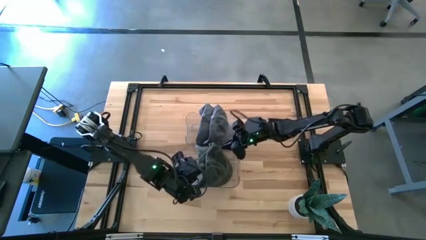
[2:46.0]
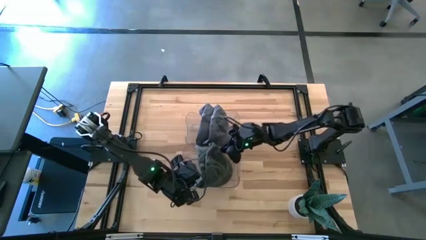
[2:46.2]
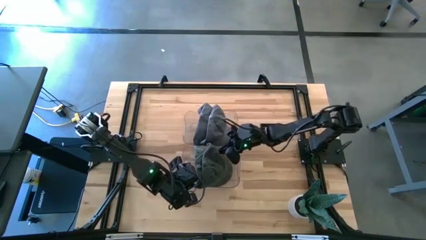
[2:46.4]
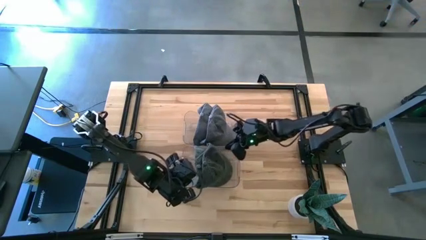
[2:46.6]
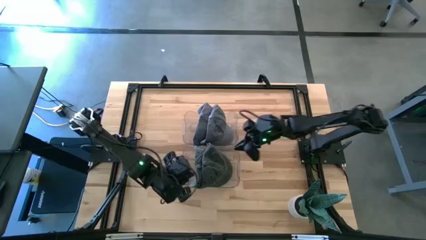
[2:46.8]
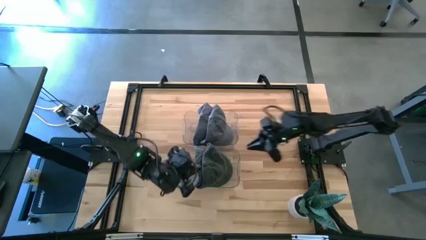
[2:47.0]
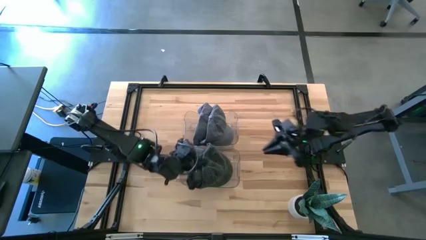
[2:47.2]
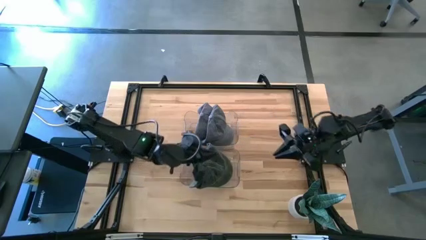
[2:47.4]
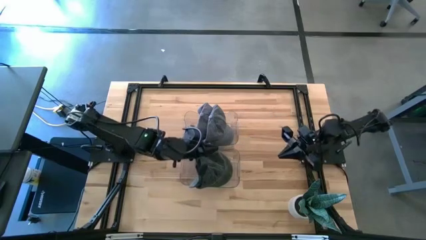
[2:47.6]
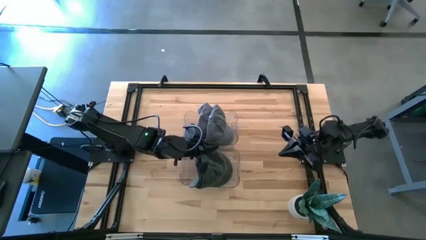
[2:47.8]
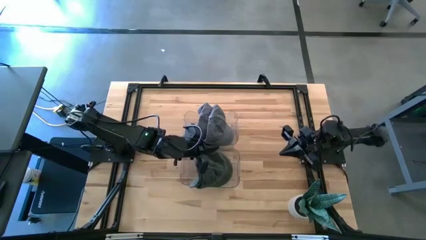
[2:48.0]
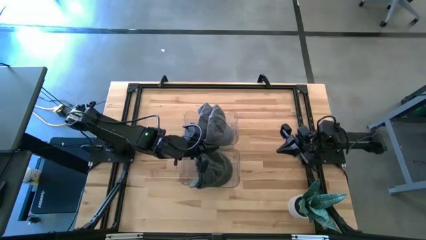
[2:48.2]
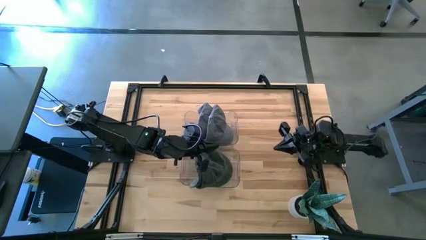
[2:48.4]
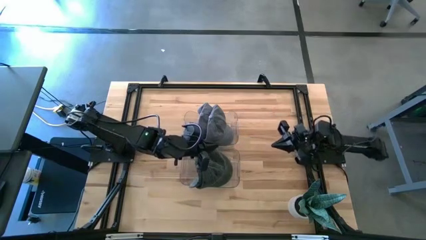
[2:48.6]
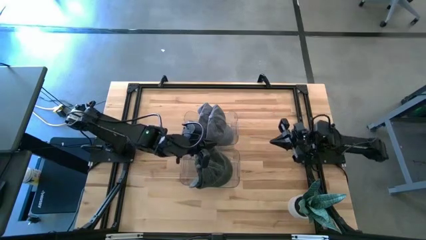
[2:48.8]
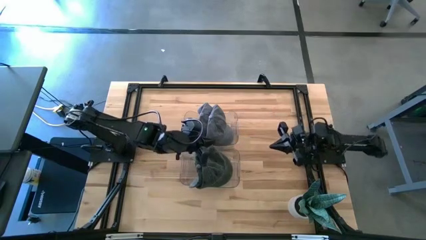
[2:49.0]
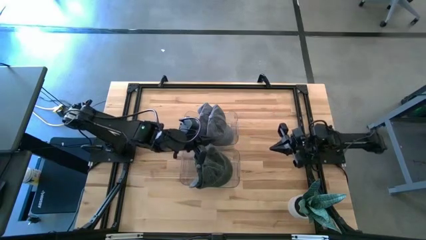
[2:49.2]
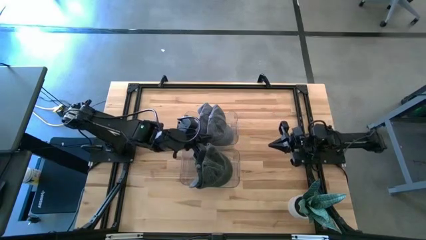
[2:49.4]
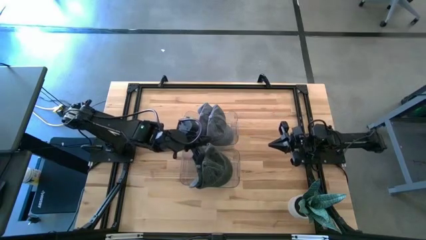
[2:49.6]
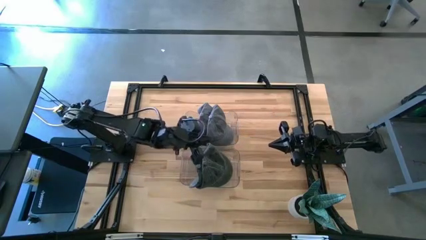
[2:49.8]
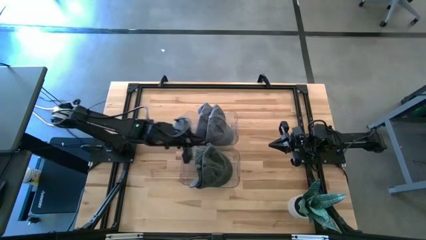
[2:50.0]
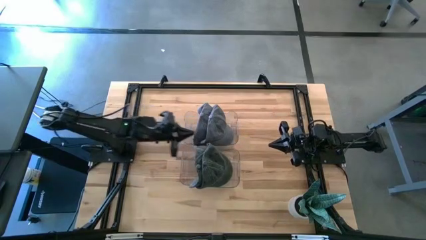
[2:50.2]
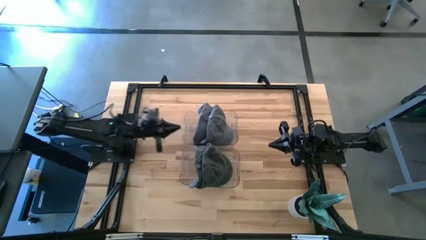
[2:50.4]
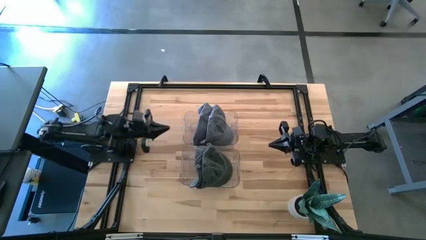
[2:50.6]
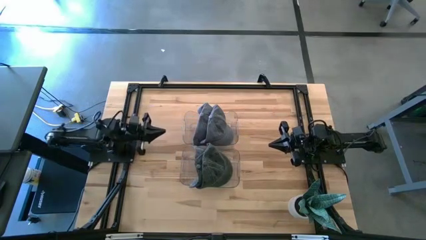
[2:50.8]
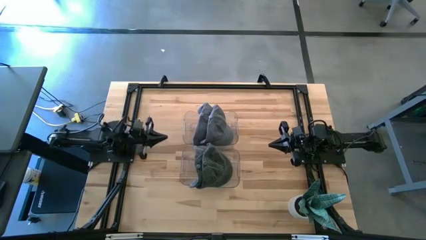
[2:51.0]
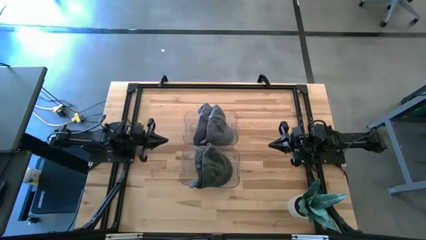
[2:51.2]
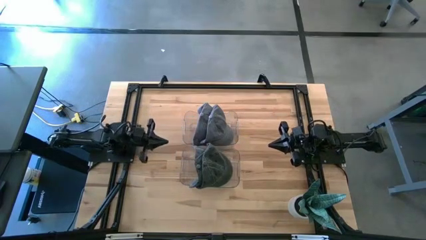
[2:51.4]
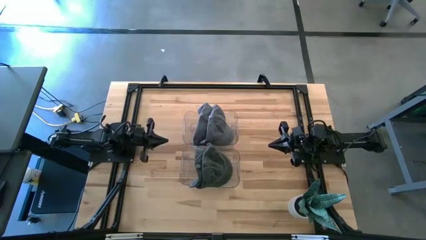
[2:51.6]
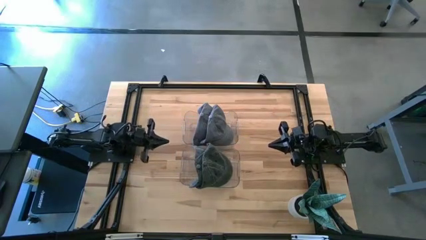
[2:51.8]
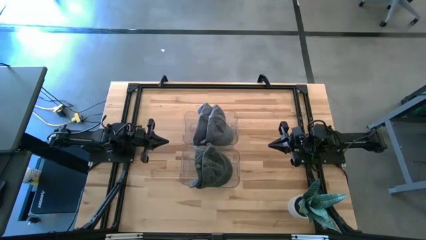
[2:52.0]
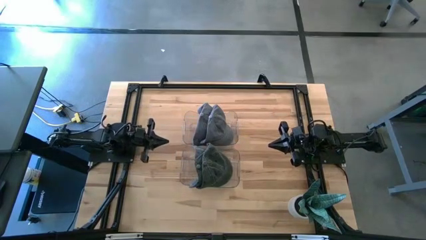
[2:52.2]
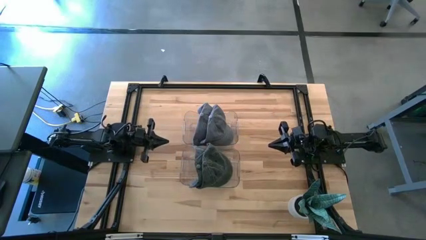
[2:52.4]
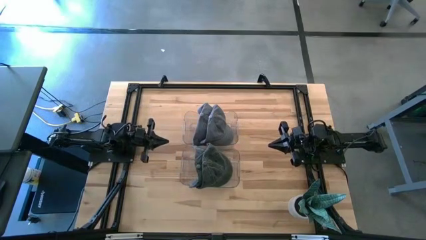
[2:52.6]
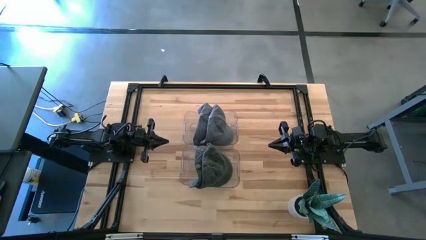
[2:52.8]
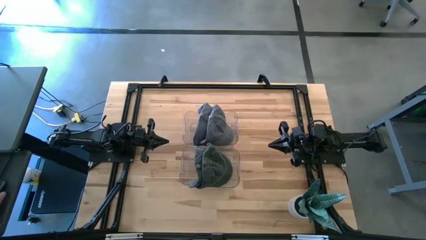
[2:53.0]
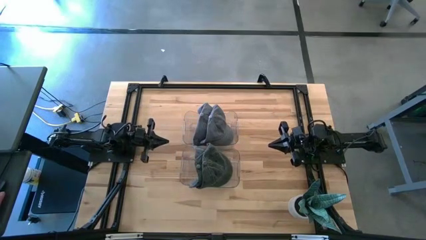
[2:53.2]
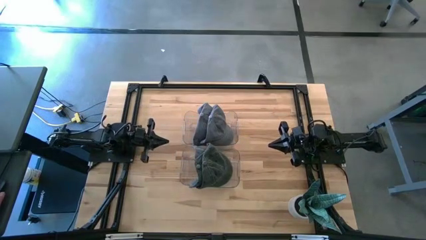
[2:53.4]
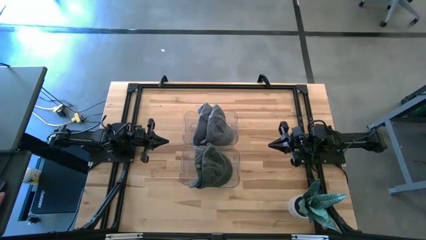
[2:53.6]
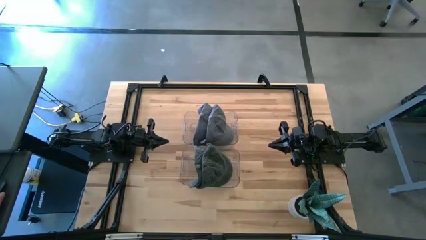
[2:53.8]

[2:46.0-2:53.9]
Task: Pick & Place hat
Return to Home Position

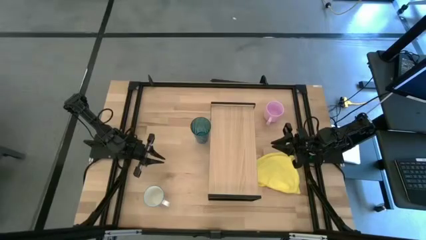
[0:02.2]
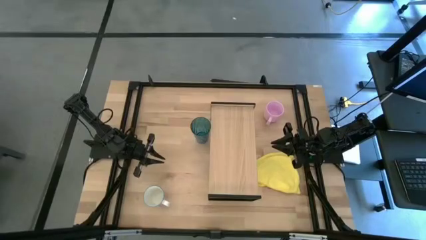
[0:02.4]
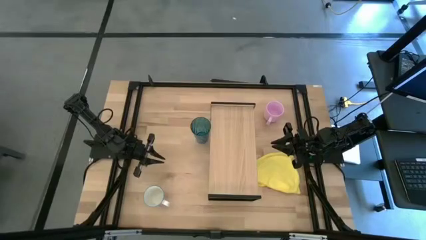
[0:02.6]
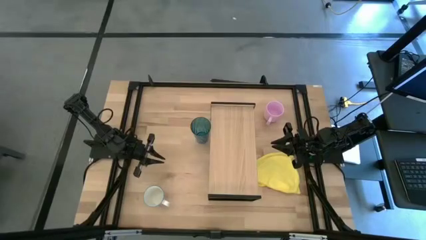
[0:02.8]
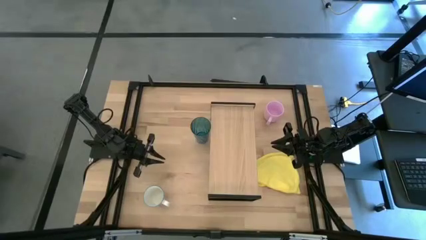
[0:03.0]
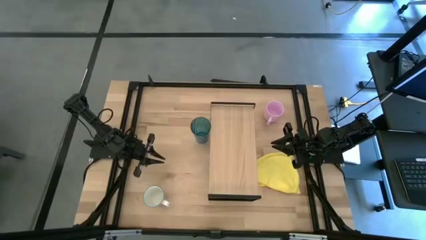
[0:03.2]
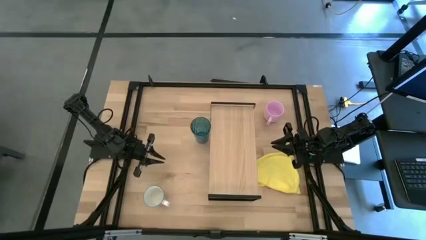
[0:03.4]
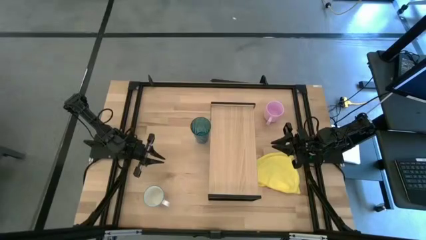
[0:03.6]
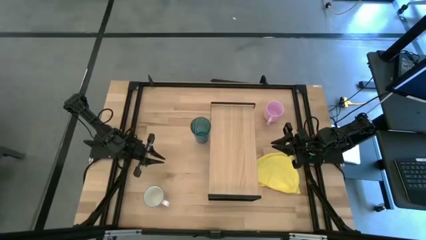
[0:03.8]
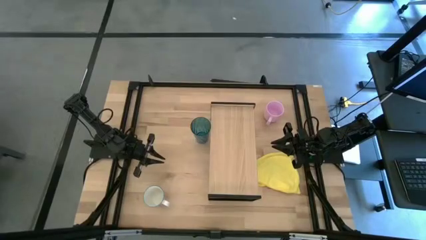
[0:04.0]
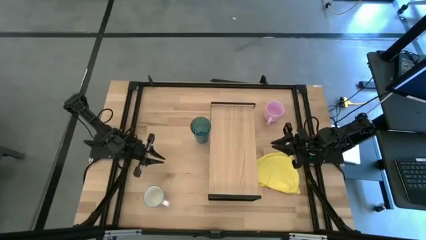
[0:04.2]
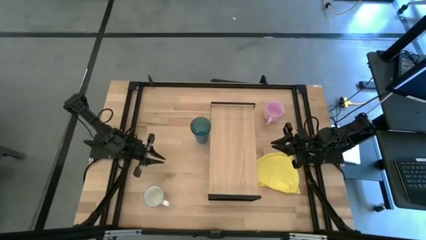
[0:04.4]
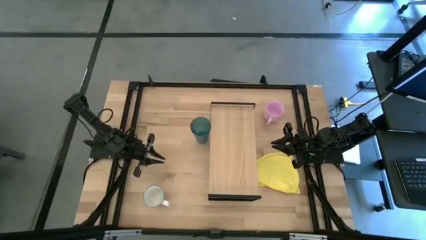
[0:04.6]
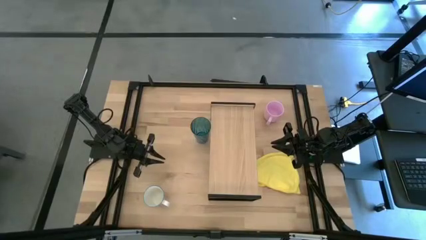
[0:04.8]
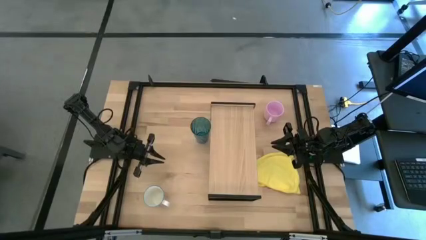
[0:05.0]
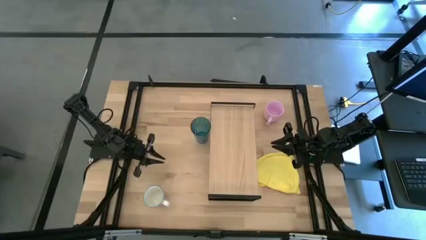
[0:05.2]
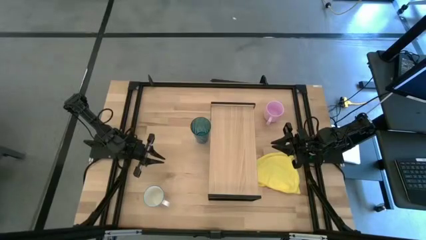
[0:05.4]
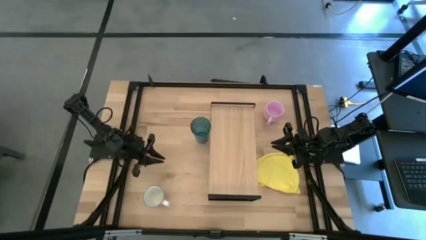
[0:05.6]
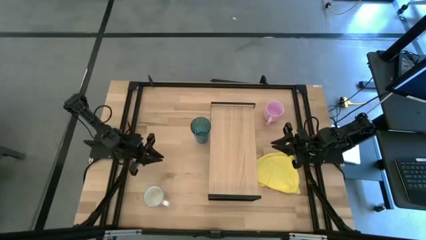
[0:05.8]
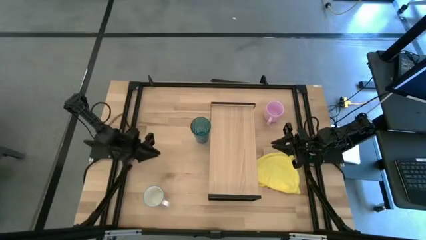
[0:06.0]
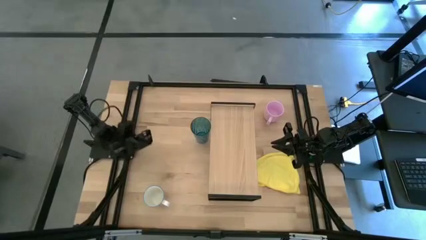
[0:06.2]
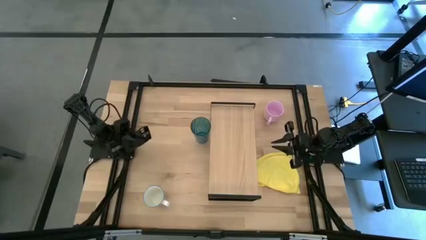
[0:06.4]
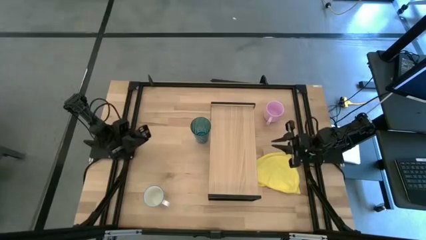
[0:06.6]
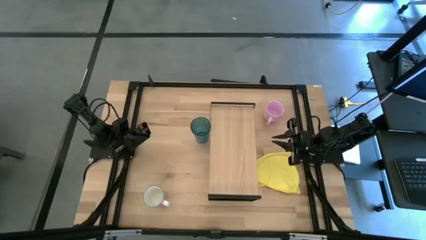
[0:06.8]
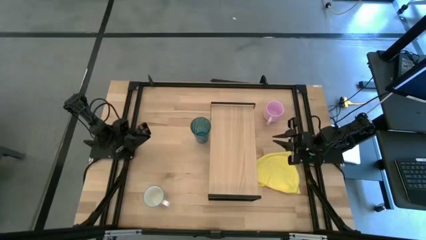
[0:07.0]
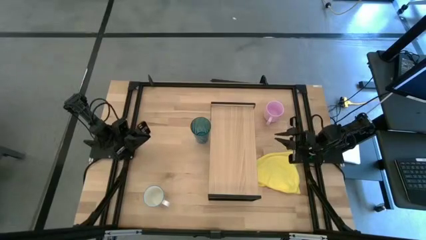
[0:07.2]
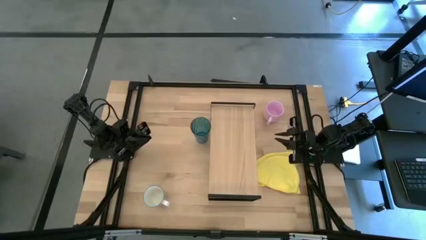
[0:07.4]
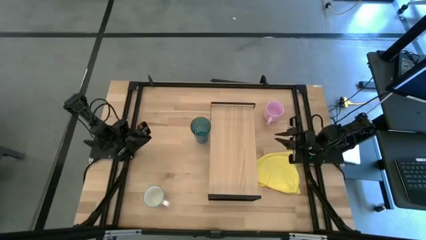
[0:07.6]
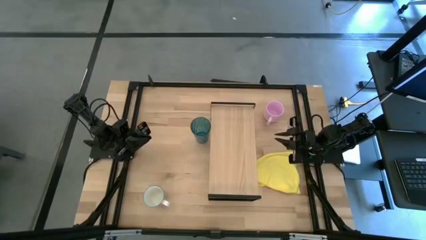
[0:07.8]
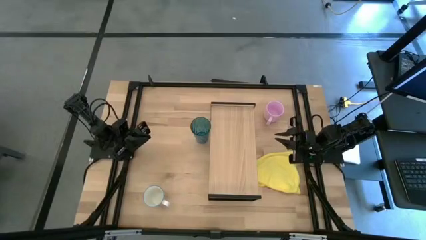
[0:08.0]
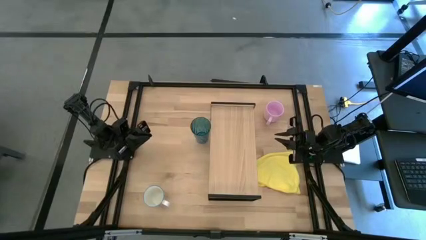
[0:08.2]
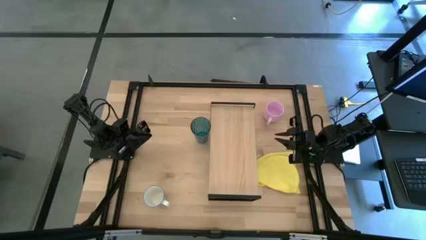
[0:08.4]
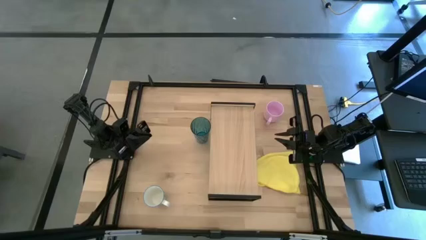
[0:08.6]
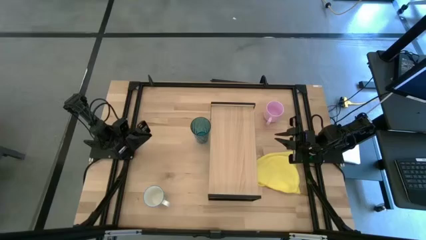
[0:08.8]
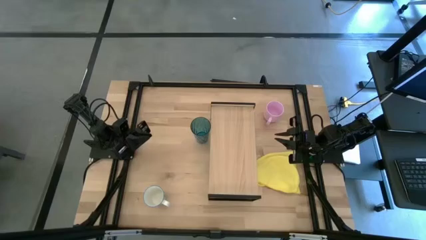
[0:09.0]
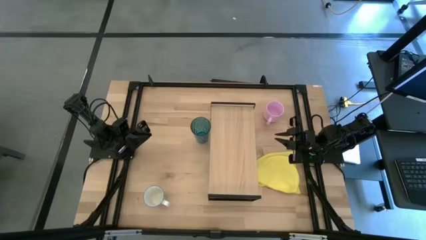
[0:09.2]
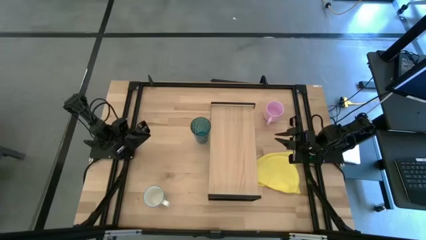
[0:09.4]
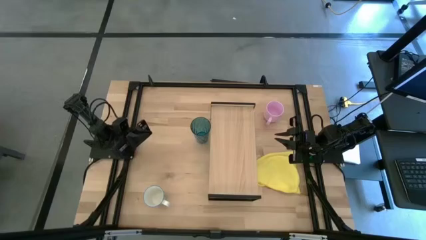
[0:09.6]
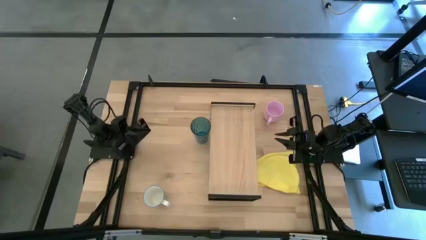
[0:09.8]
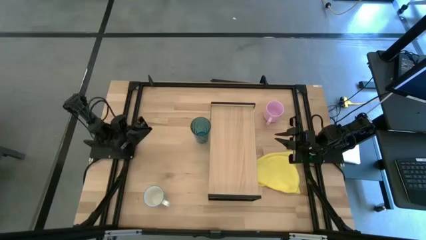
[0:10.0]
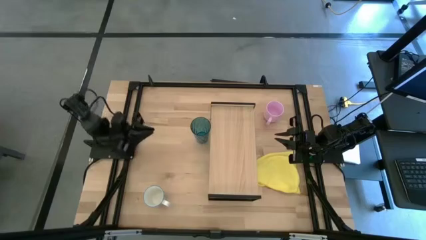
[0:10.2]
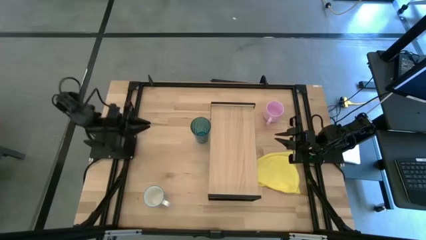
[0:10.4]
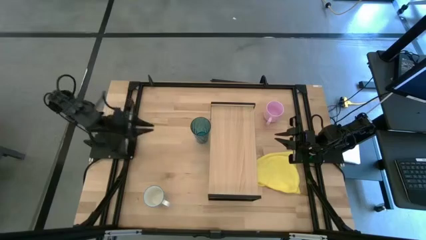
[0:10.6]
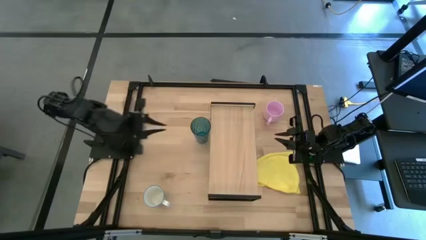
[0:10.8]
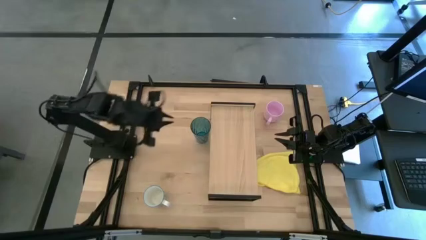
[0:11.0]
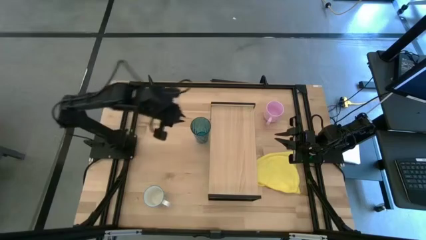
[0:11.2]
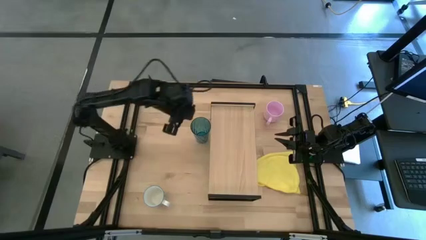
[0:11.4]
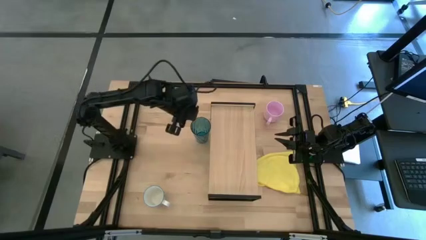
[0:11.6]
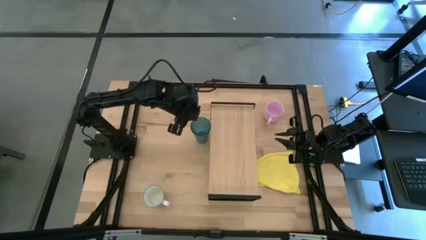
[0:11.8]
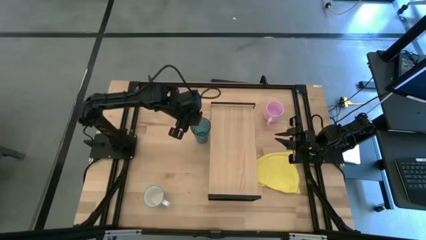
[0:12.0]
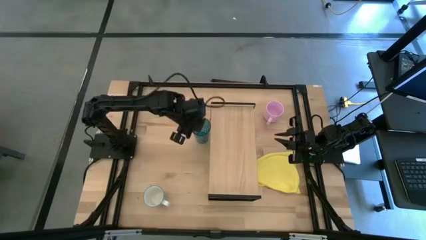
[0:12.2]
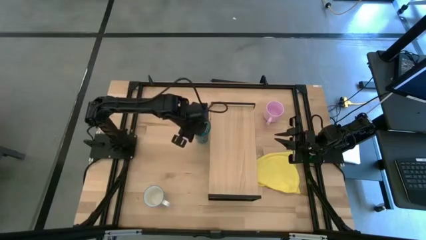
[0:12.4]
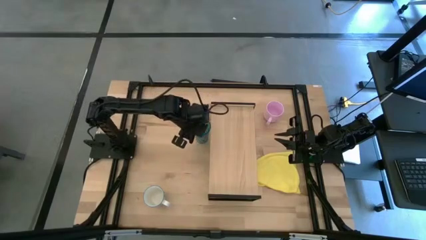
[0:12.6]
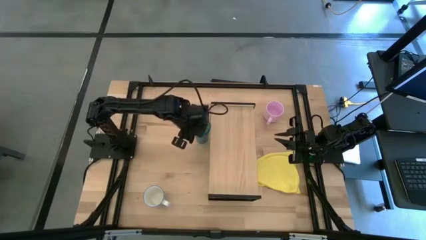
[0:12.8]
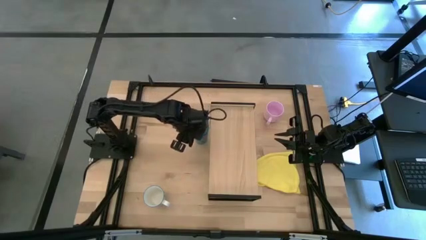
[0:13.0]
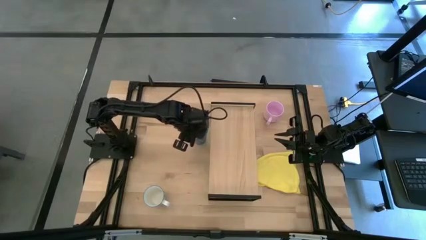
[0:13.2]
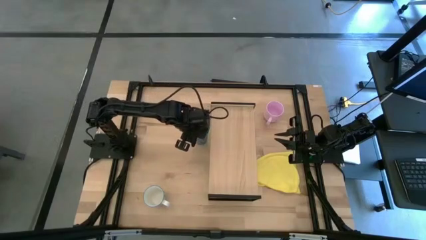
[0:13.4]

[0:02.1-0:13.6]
Task: Stack small to large cups/mugs on shelf
Put the blue cup on the shelf
